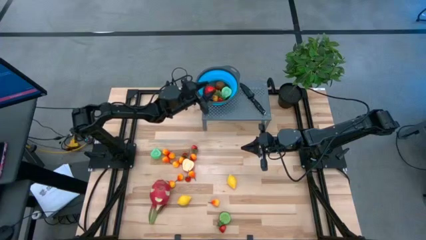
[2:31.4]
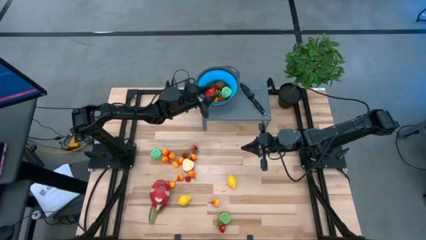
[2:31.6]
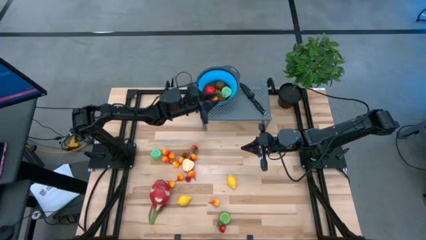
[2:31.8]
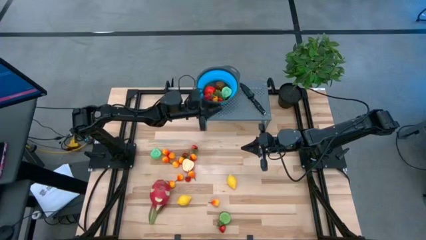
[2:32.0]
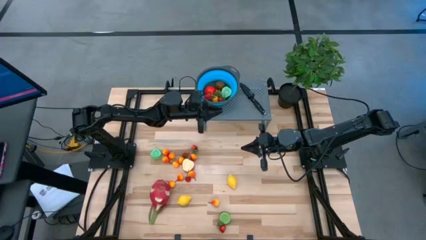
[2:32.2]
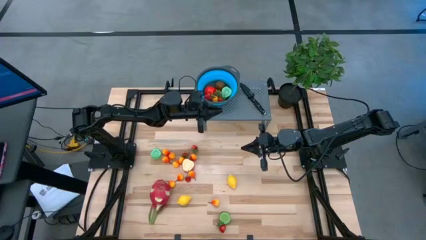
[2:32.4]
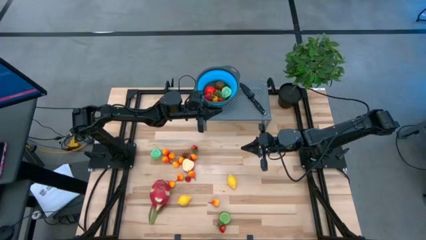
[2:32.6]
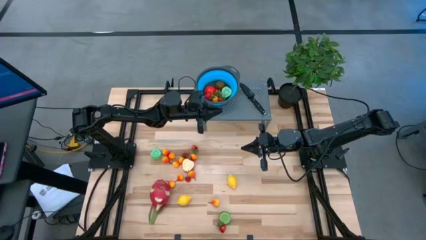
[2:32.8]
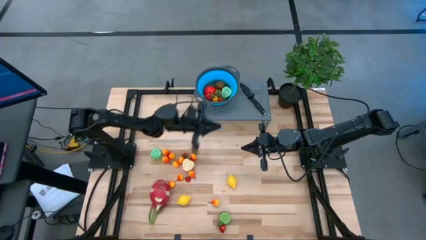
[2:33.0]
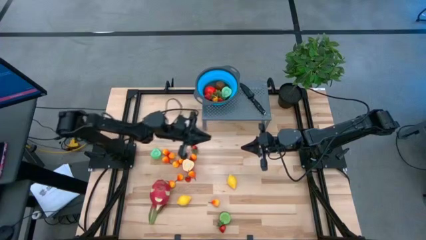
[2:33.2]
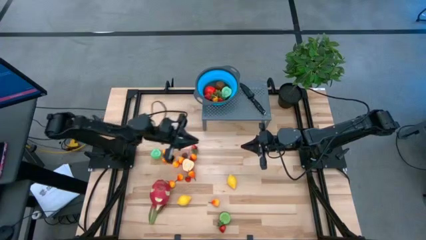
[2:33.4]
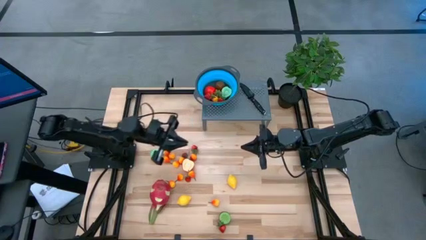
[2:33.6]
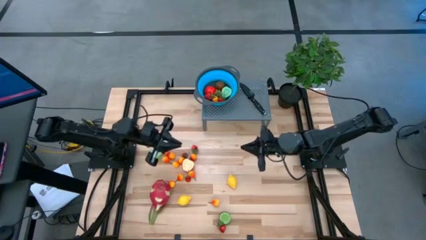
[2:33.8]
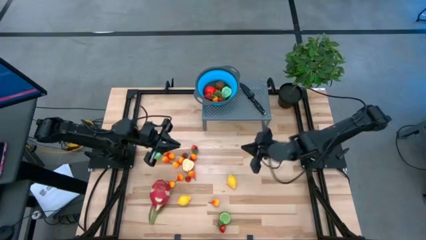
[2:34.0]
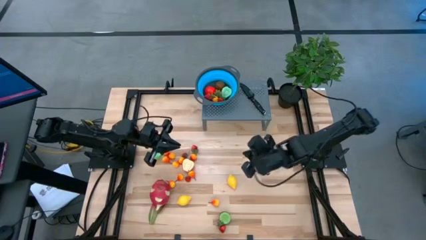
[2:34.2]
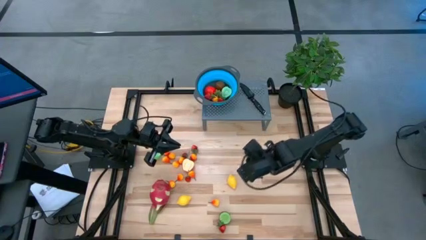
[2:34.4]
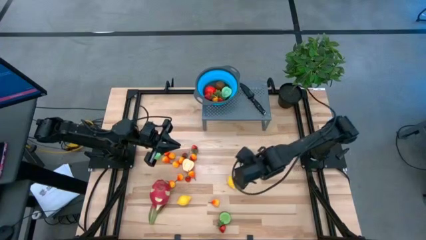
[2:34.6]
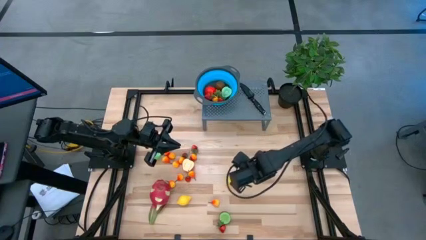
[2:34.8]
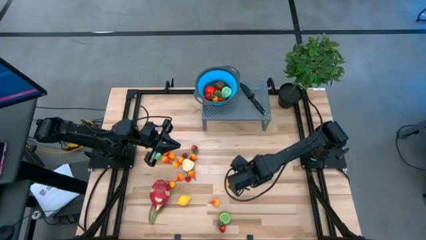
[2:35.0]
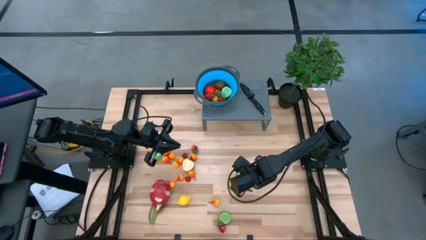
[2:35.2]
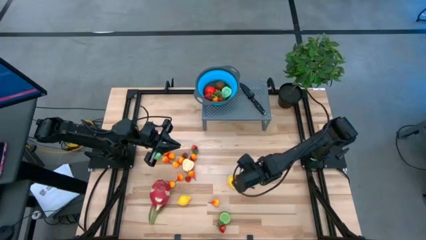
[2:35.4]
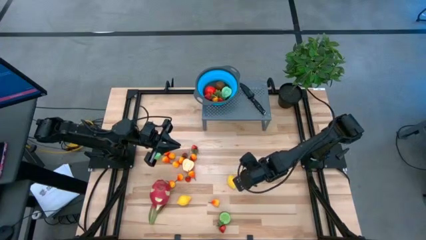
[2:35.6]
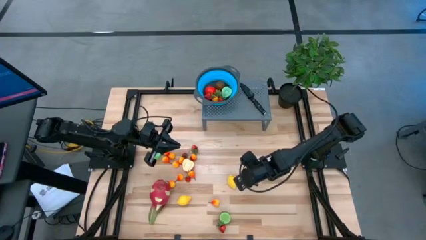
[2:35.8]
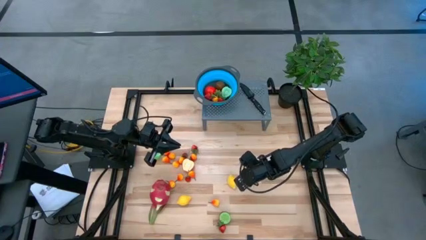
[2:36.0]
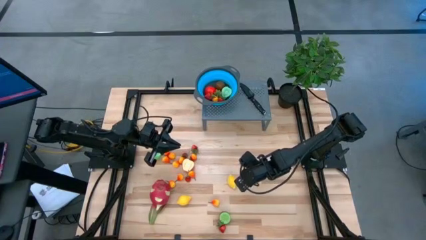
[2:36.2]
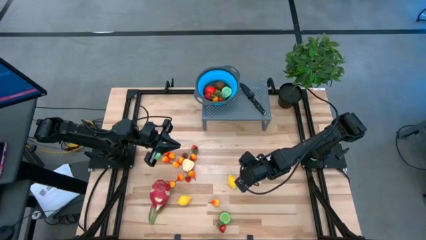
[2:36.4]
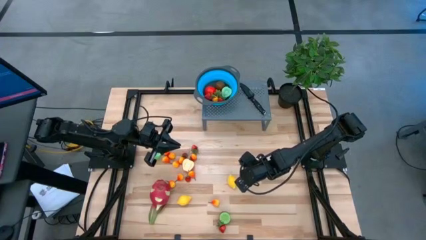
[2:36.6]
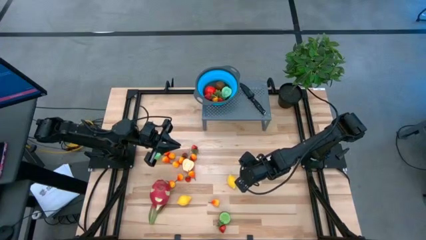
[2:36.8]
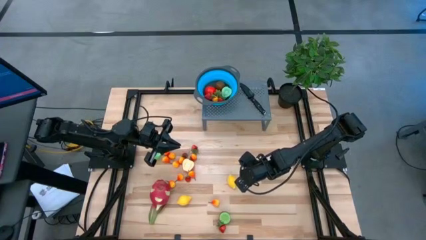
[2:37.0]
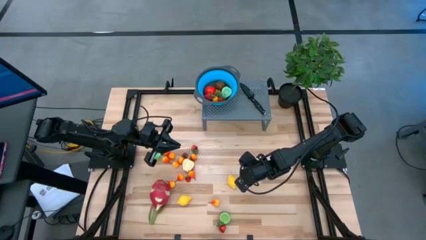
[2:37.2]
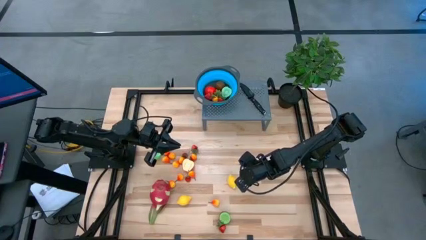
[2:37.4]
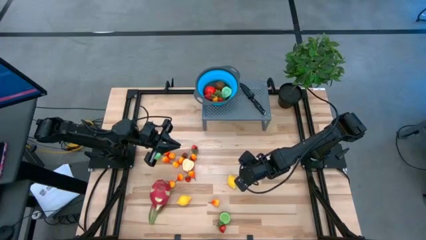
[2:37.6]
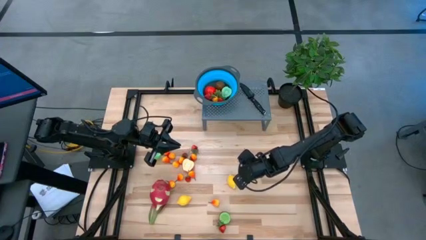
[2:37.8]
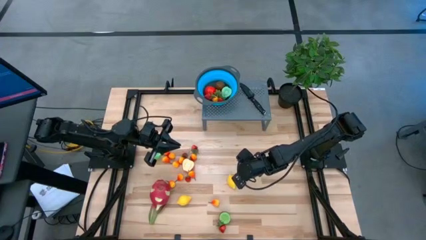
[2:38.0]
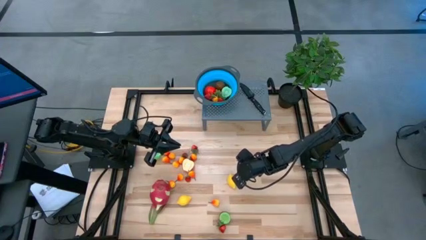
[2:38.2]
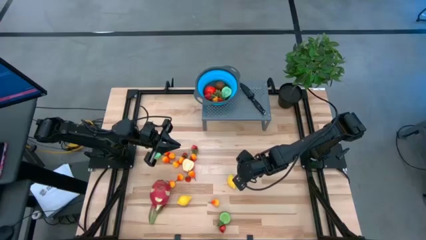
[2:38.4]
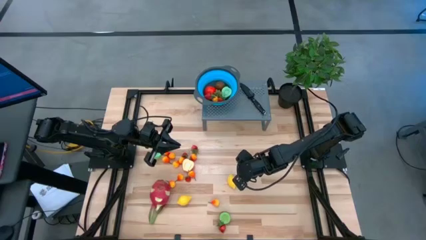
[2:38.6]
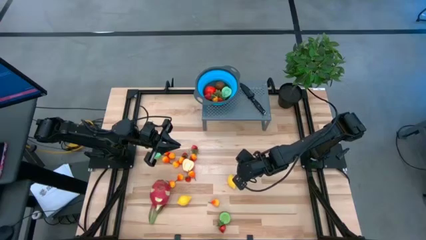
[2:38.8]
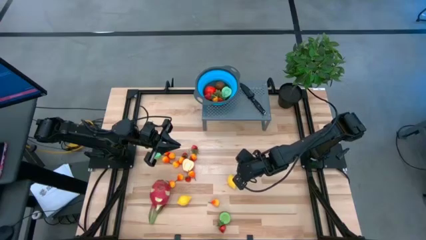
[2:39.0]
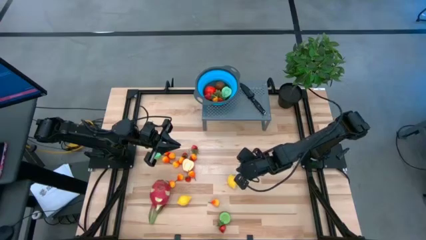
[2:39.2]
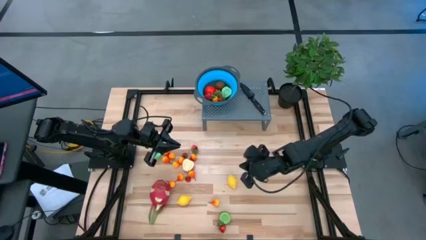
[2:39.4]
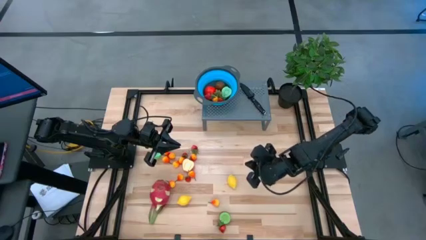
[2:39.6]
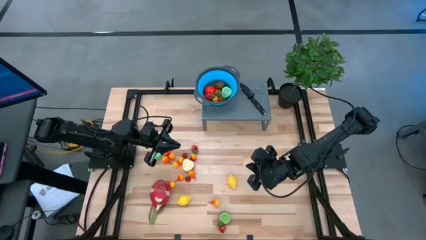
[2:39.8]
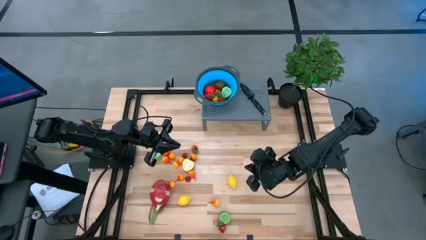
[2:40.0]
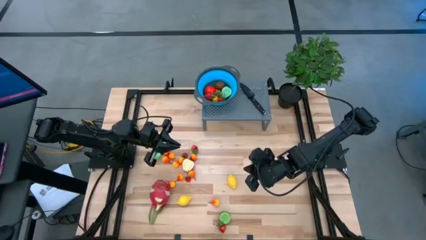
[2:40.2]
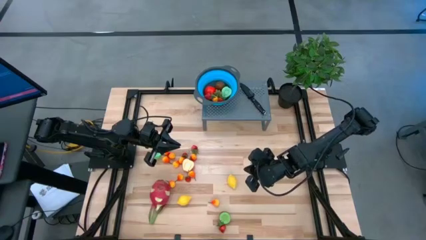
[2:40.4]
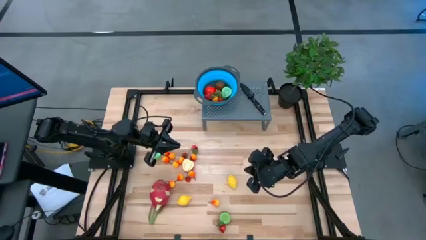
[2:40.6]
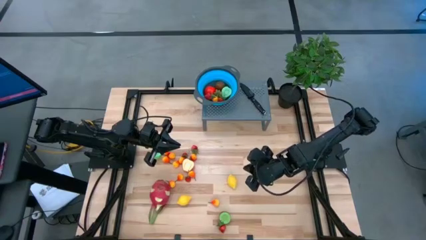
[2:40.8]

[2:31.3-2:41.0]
Task: Pick & Place Fruit
Put the right lemon into the strainer bowl

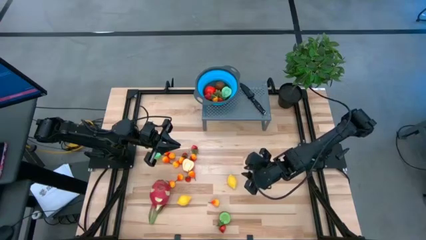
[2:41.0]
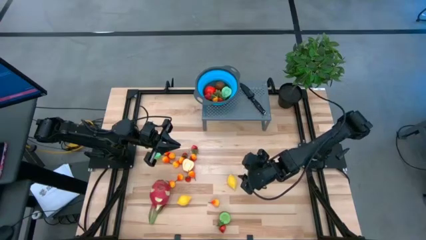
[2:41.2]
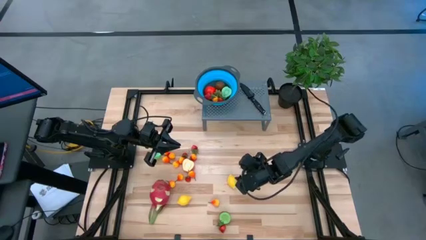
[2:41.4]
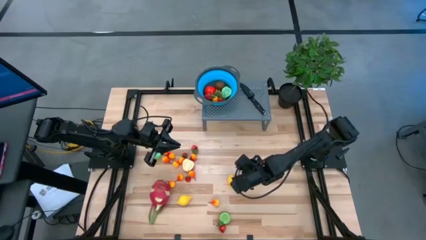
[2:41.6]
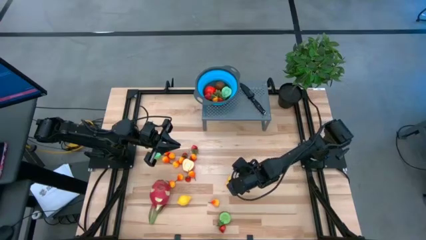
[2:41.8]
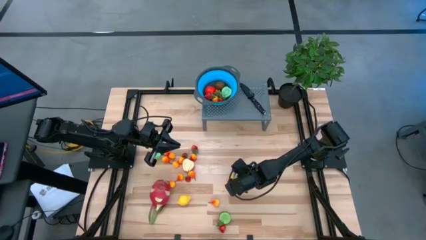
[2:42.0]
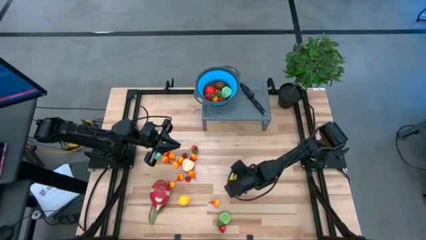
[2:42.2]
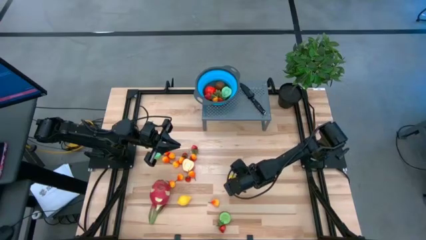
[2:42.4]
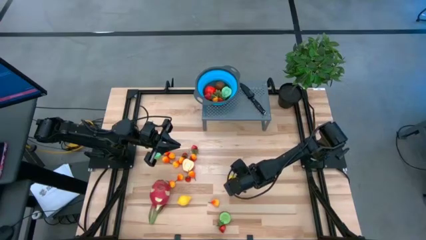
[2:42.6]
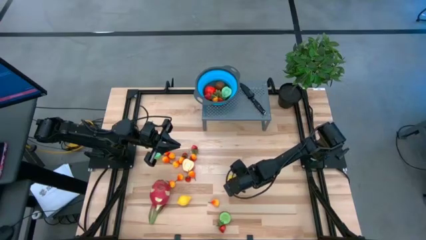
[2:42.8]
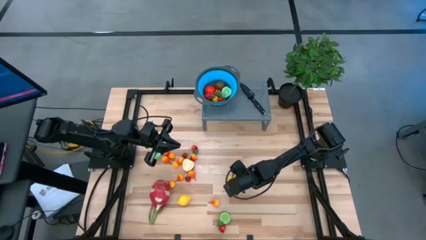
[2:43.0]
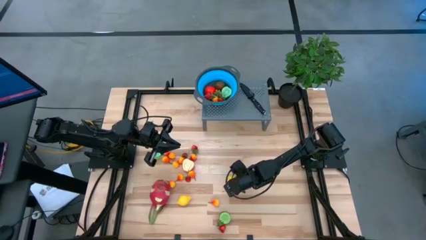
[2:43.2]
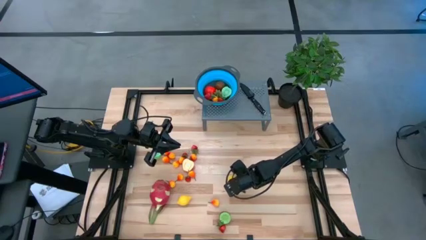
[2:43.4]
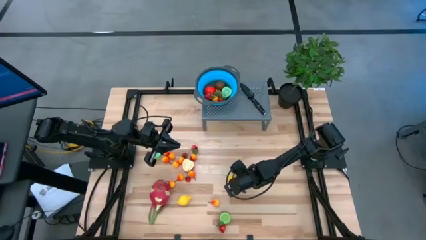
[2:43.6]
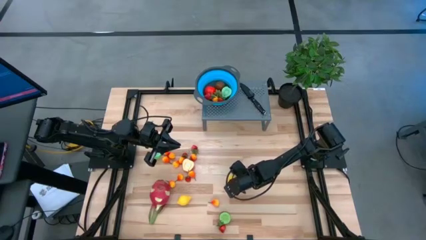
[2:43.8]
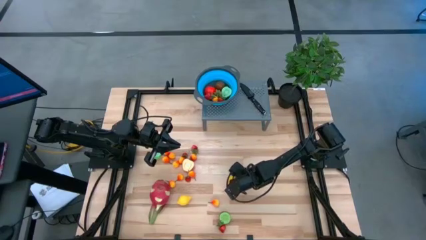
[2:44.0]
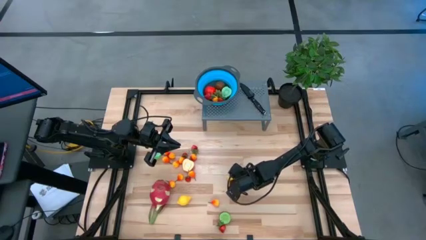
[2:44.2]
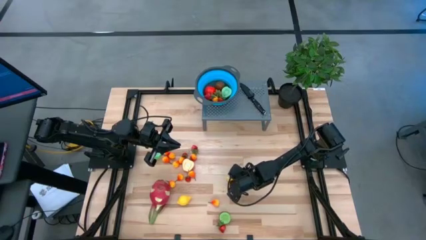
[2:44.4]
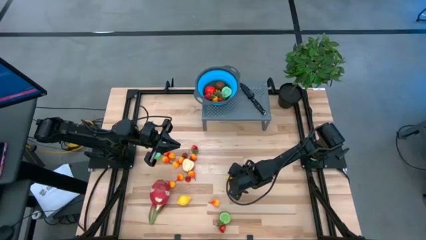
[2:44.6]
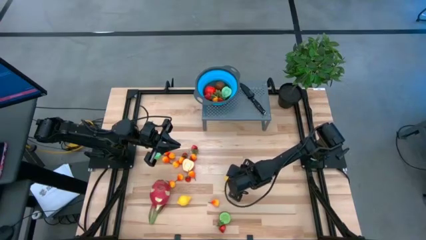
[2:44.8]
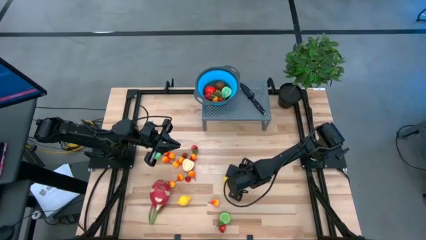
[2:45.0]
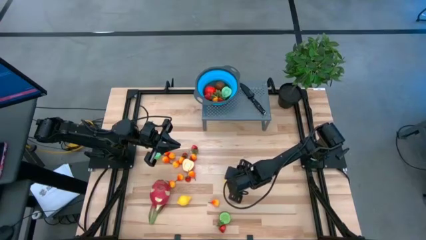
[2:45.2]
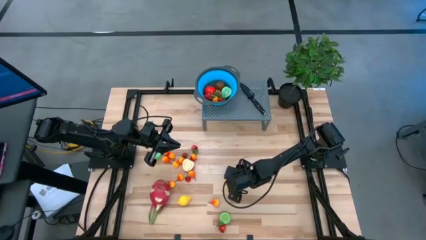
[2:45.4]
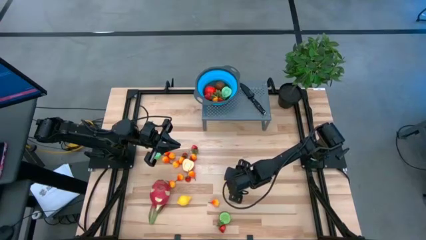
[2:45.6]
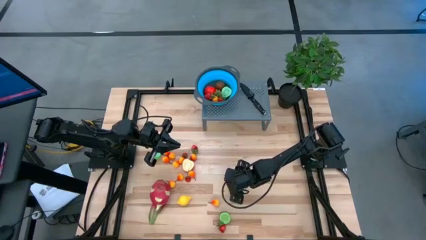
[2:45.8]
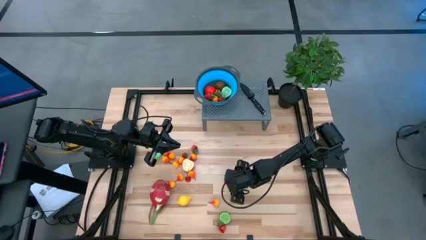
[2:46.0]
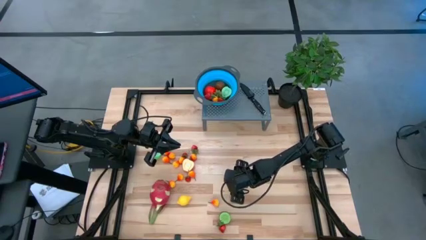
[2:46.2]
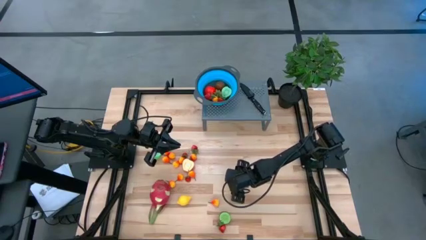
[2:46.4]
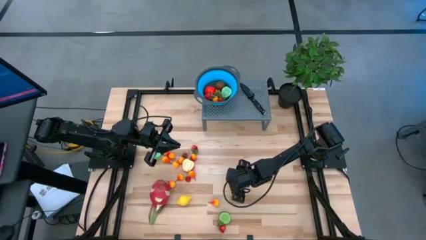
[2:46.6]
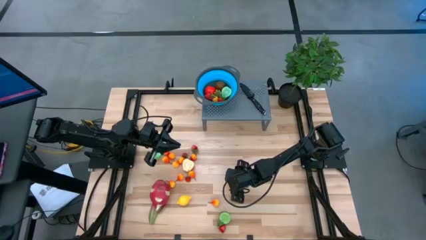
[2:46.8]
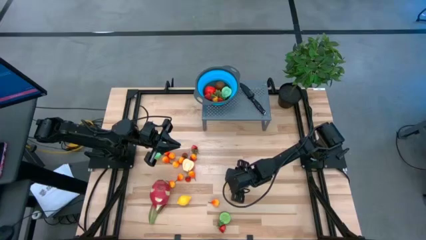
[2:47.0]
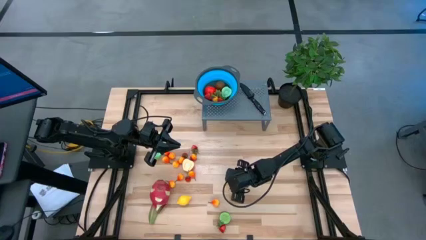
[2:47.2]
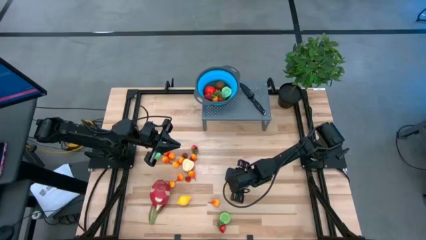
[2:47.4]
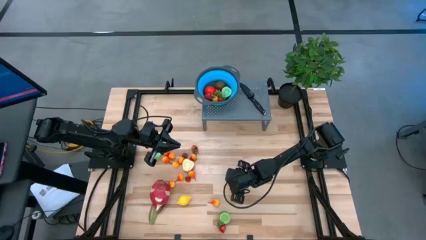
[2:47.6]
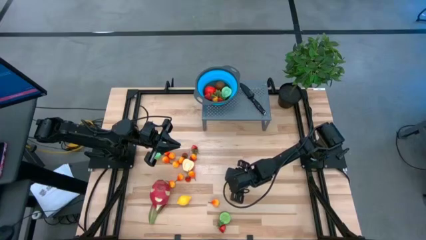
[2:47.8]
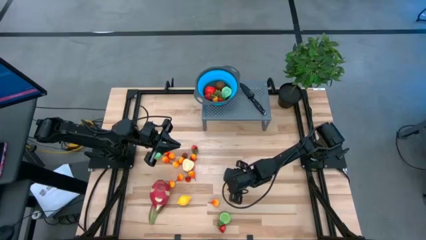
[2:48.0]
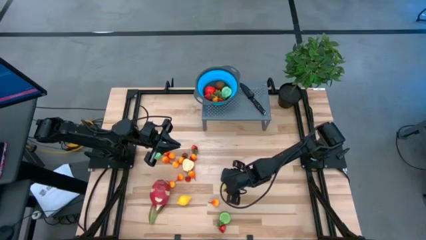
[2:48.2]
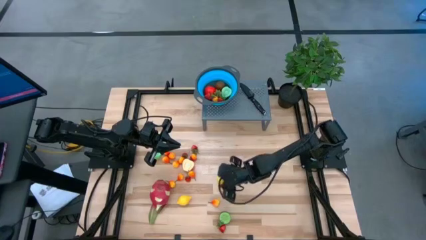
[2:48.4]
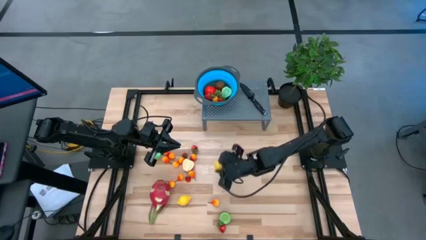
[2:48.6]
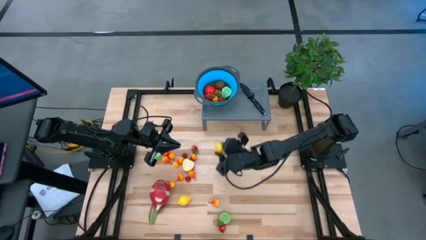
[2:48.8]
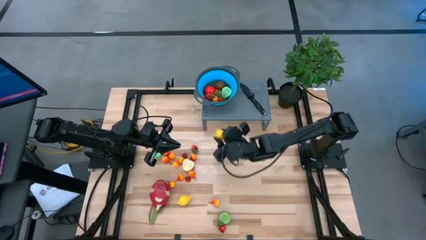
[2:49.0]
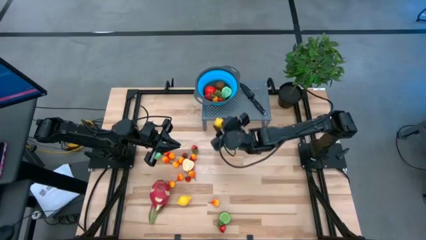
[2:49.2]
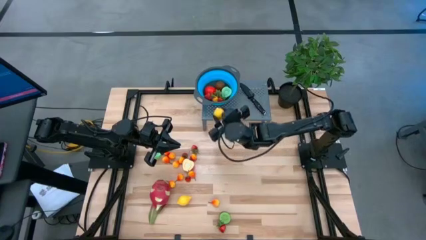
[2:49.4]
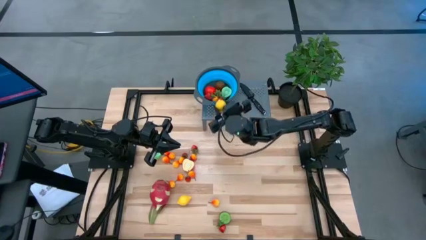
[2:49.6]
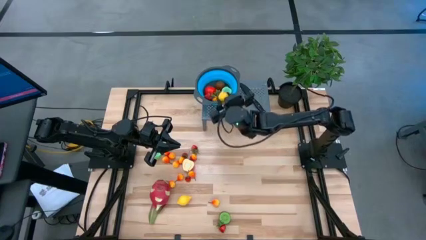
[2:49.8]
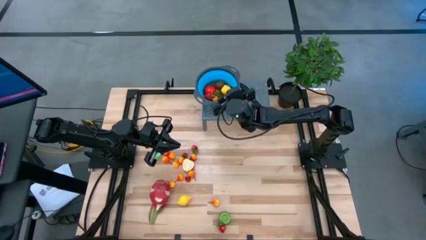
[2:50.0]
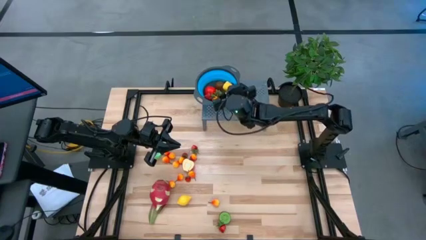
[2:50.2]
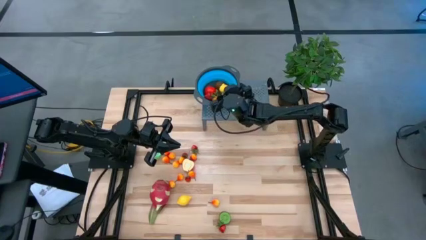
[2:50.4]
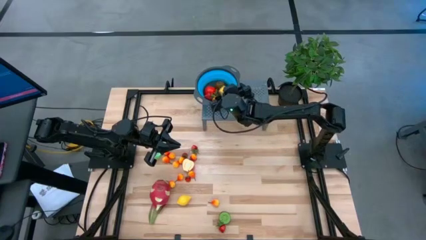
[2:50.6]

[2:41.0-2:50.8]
Put the right lemon into the strainer bowl
